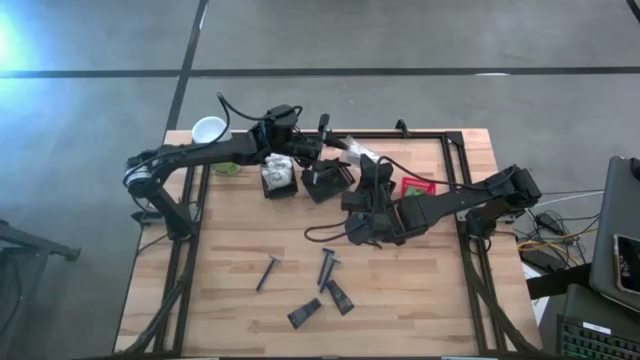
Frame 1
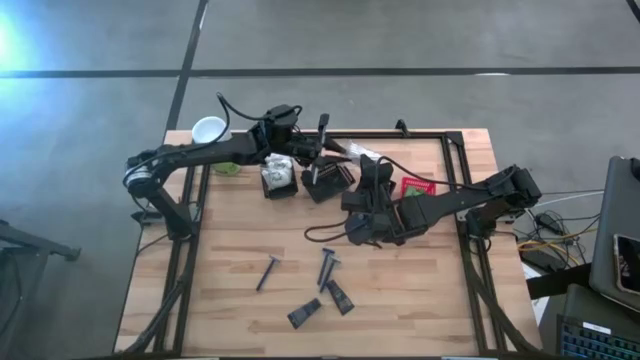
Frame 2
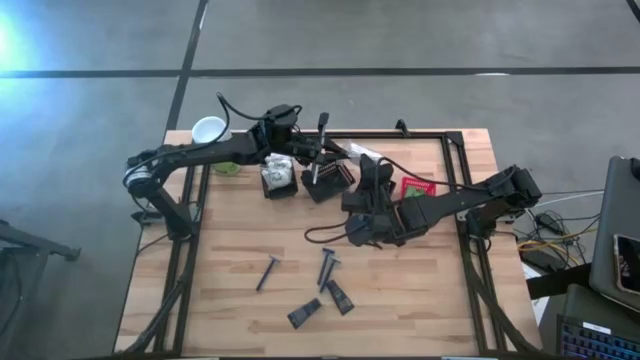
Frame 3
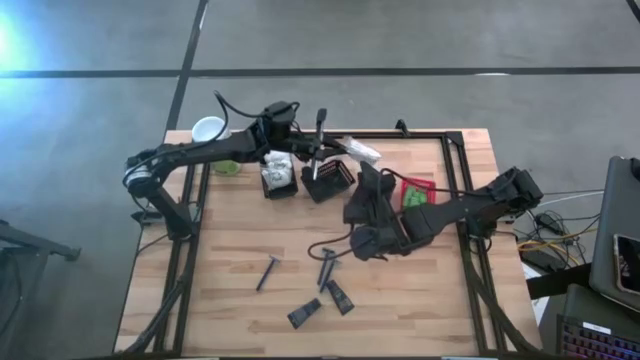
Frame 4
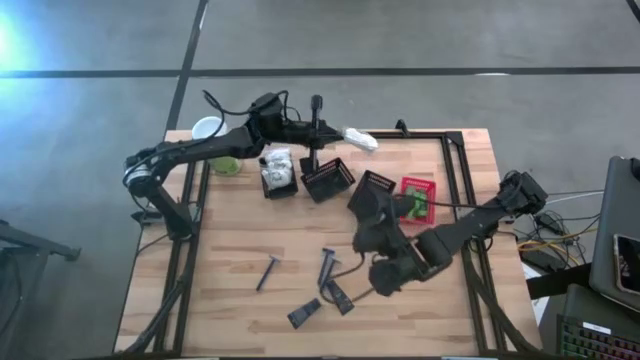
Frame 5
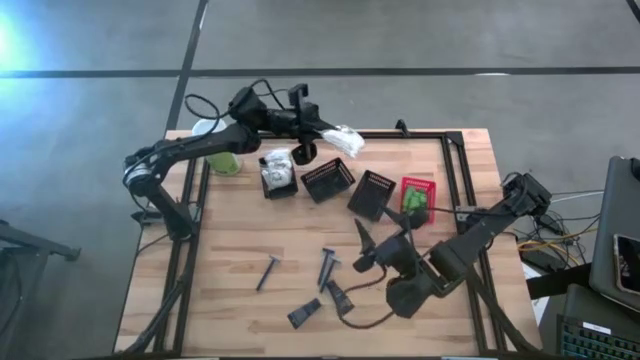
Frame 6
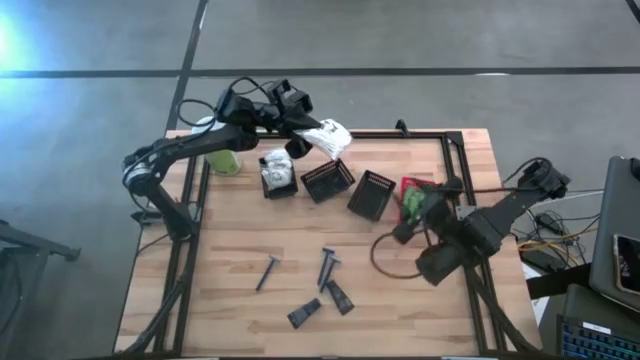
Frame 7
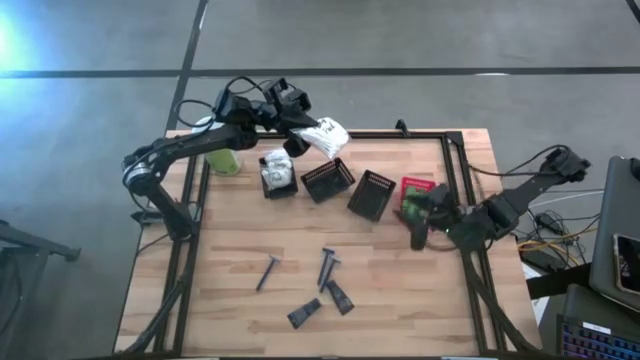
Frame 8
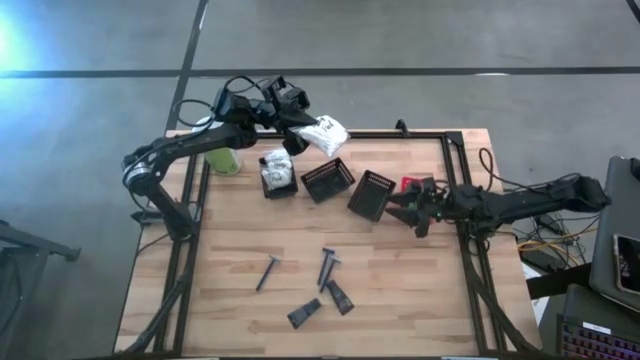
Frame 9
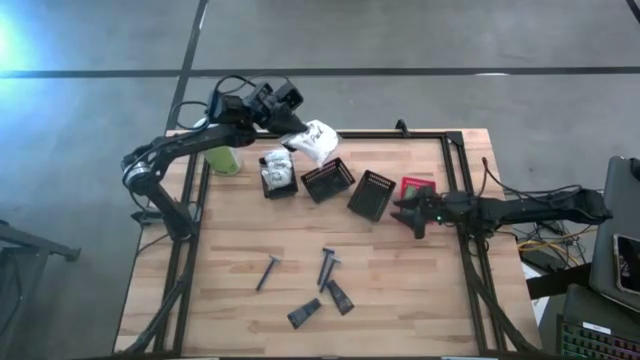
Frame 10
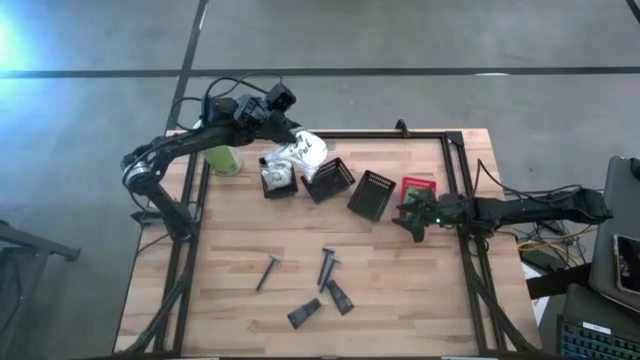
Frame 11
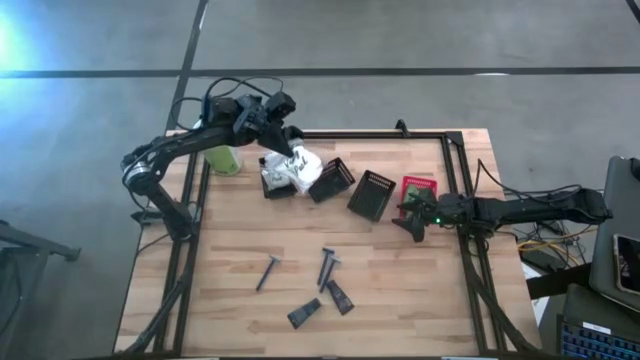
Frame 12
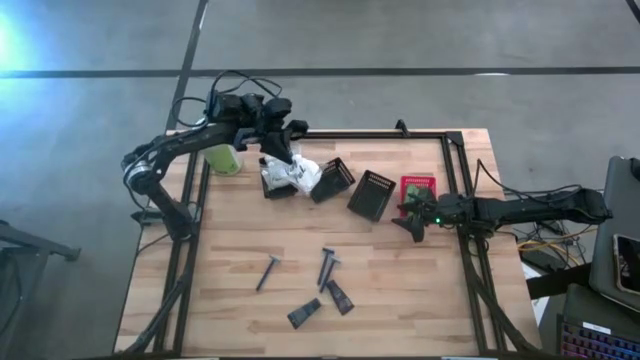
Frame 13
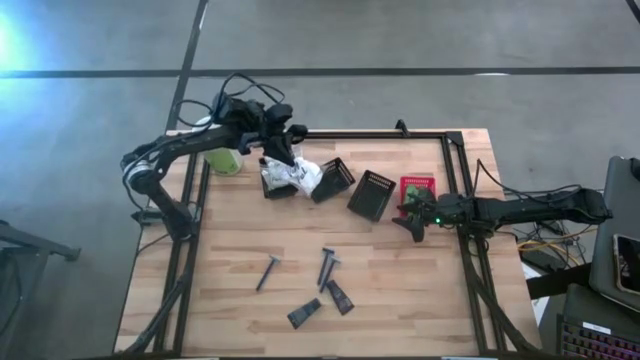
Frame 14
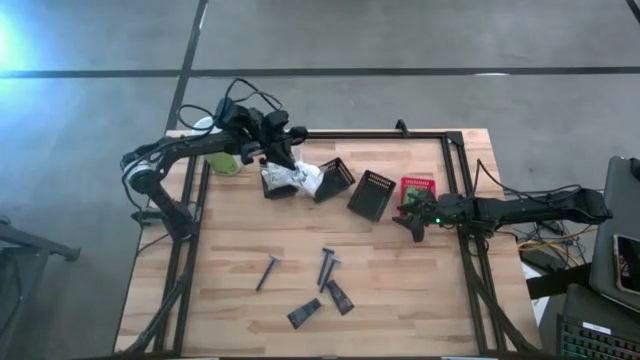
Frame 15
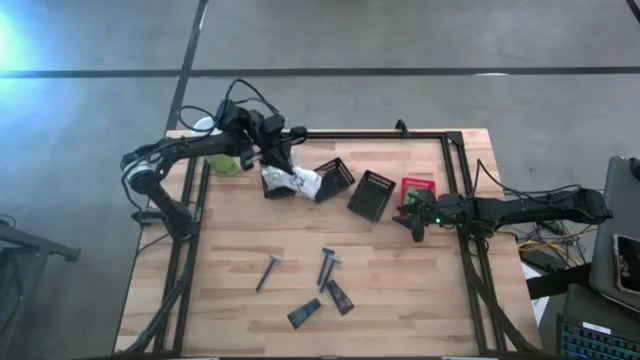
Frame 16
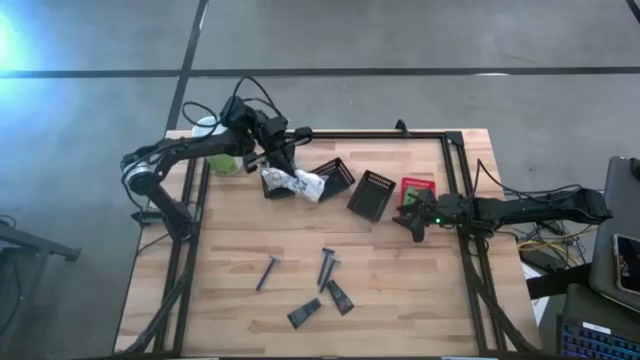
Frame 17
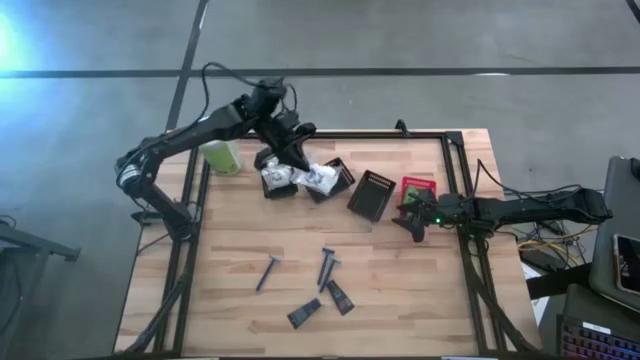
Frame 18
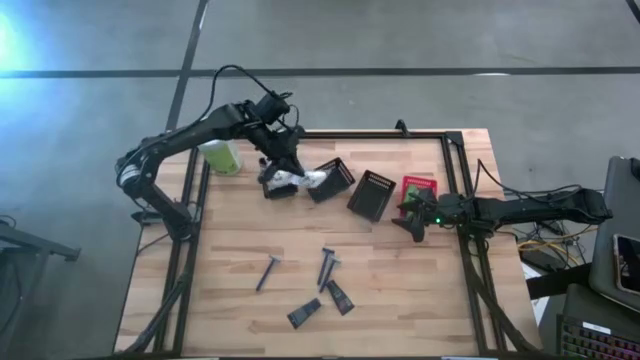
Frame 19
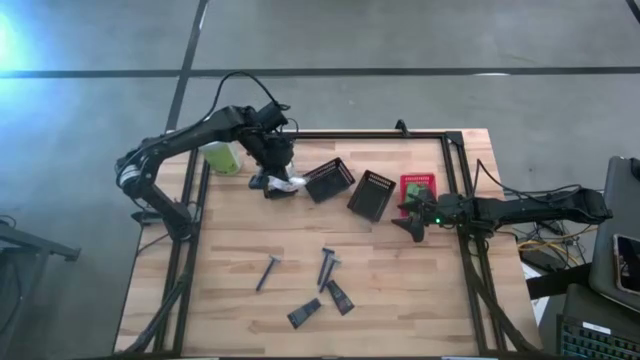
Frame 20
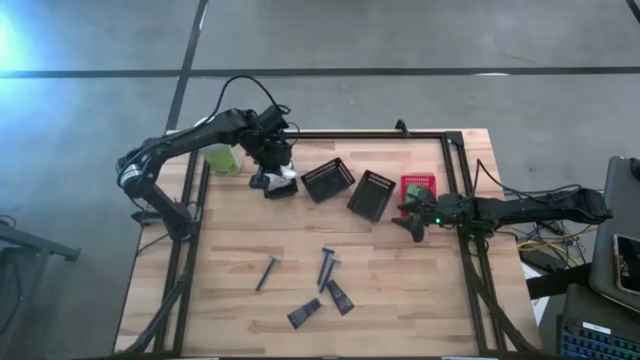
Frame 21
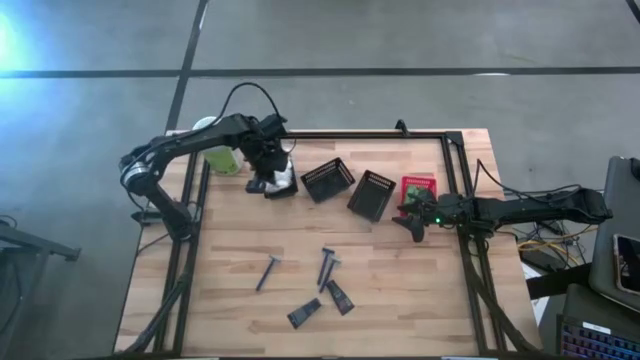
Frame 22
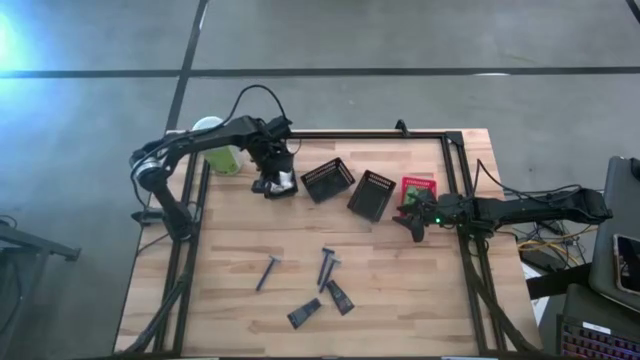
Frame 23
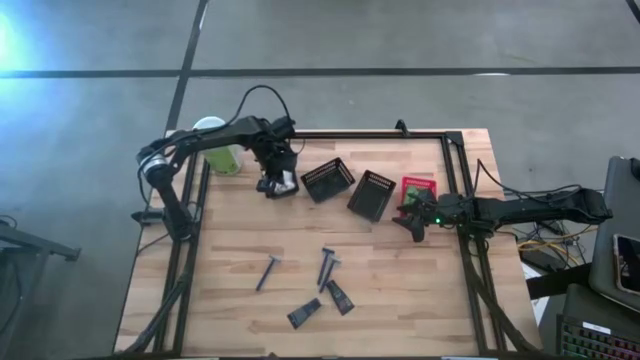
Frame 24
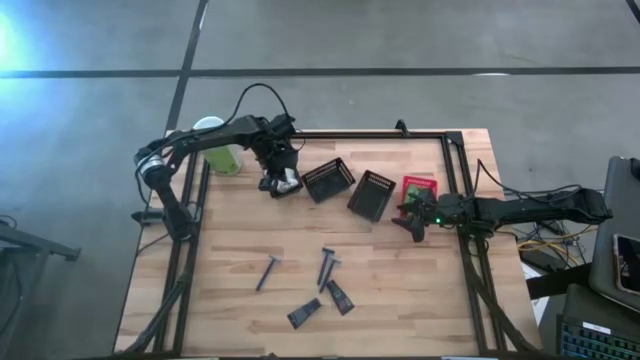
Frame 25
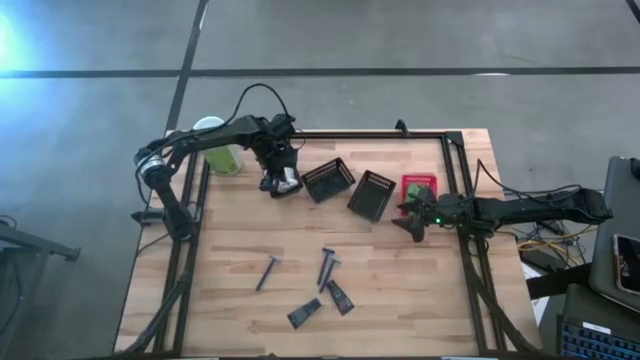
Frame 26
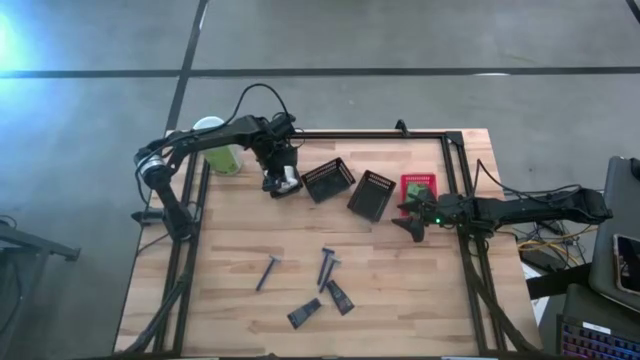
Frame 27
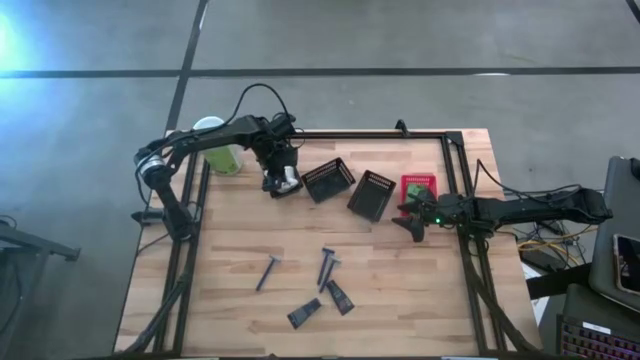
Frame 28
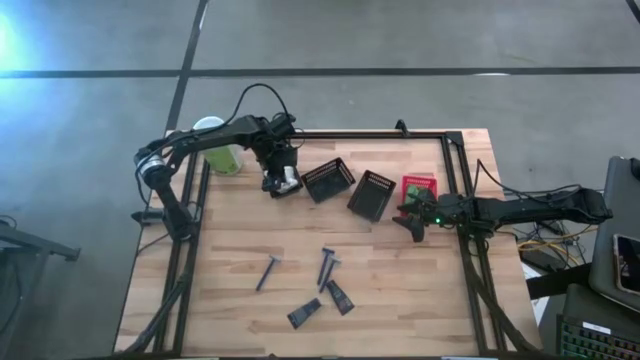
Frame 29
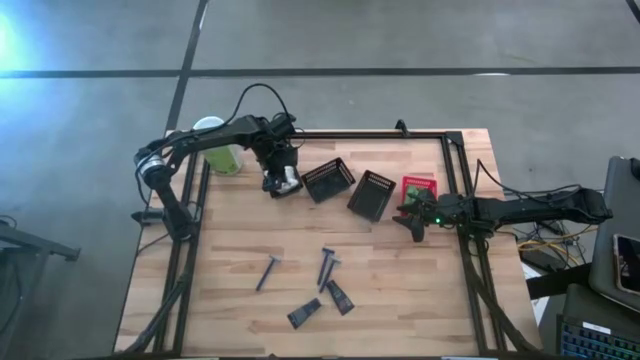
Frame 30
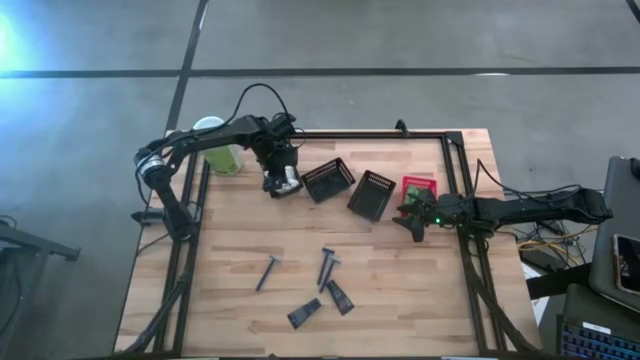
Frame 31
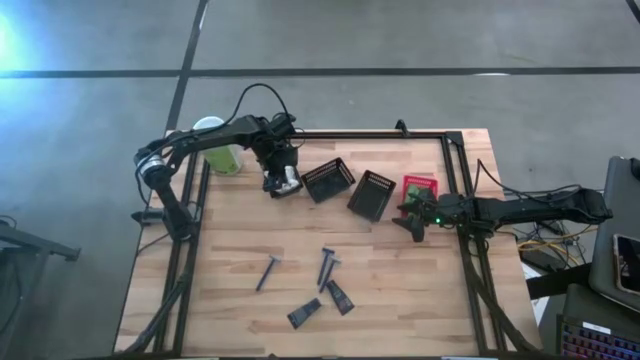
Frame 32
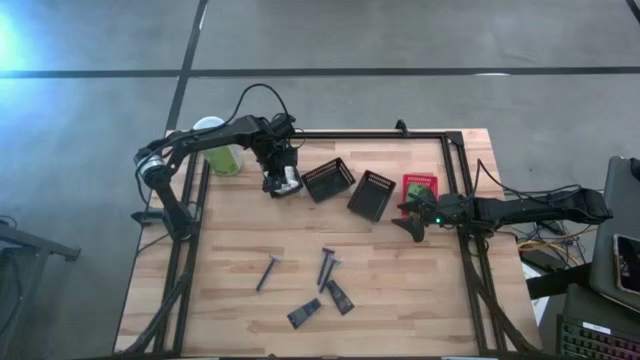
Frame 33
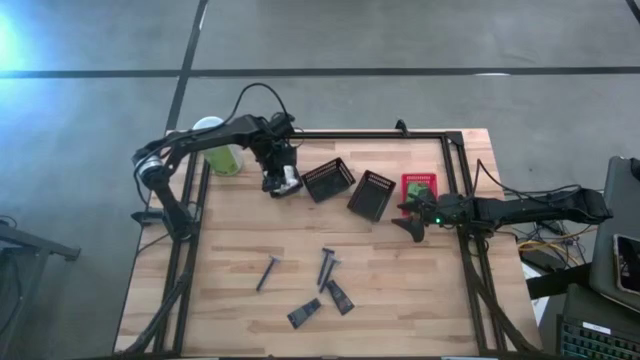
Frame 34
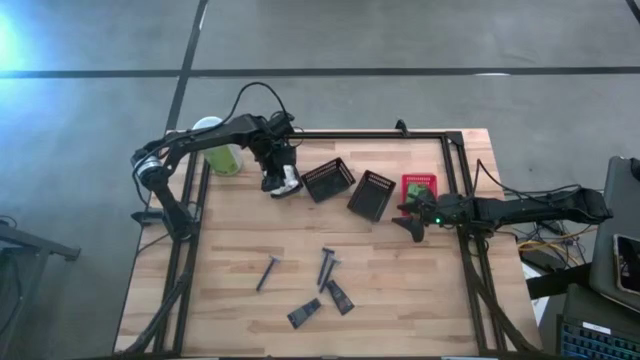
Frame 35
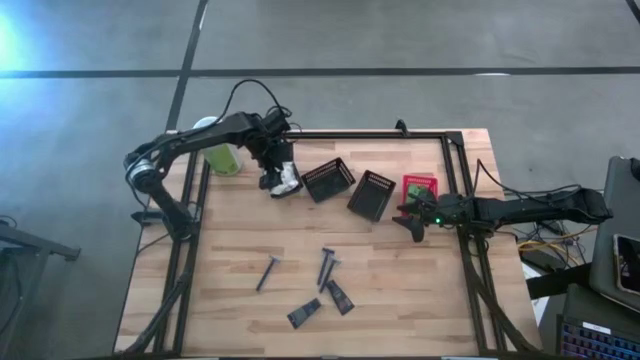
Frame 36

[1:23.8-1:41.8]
Task: Pick & Place Travel size toiletries
Put the cotton pack into the left black bin

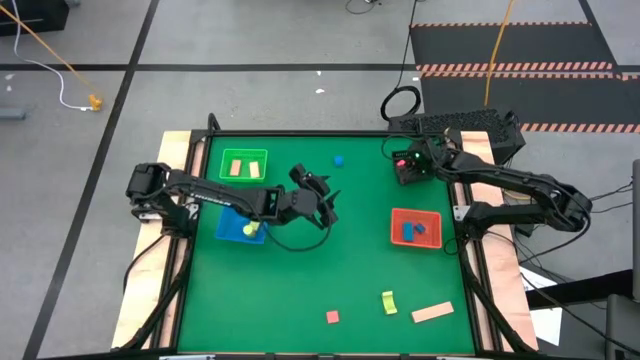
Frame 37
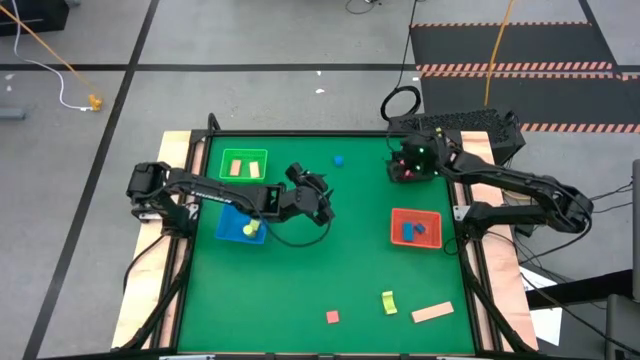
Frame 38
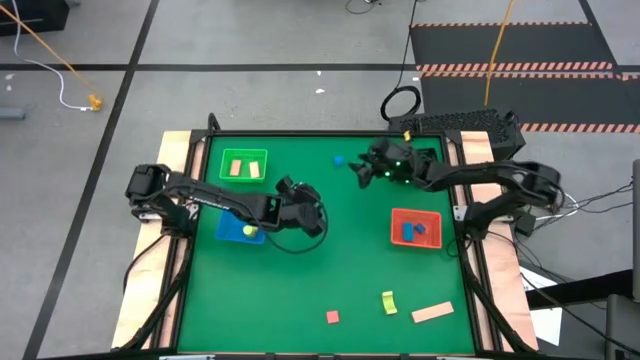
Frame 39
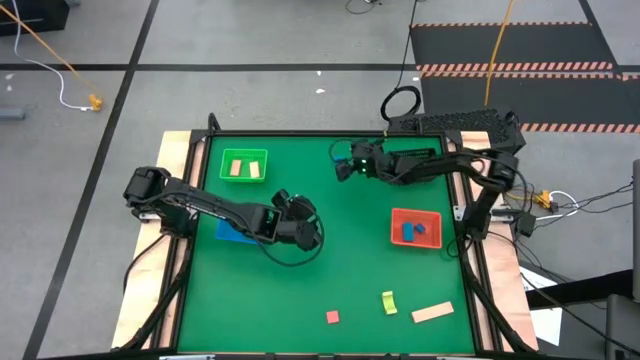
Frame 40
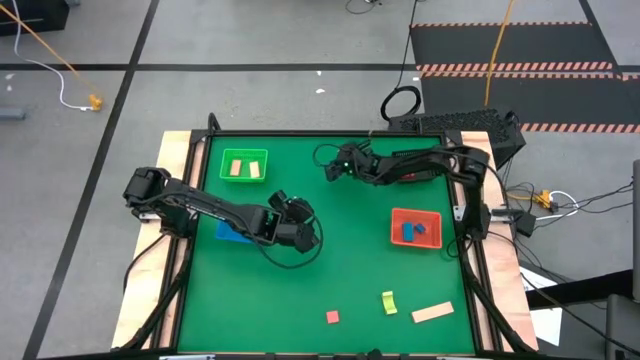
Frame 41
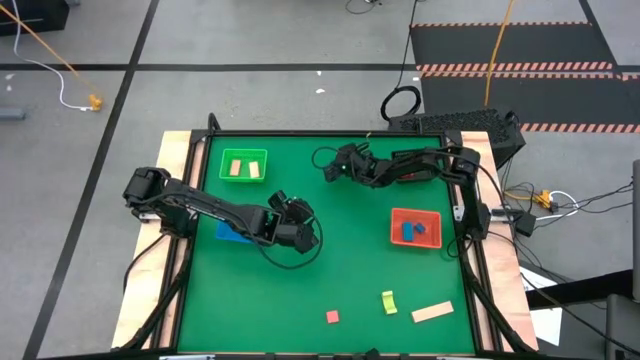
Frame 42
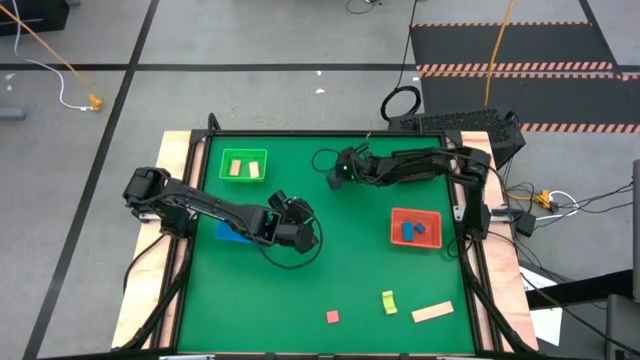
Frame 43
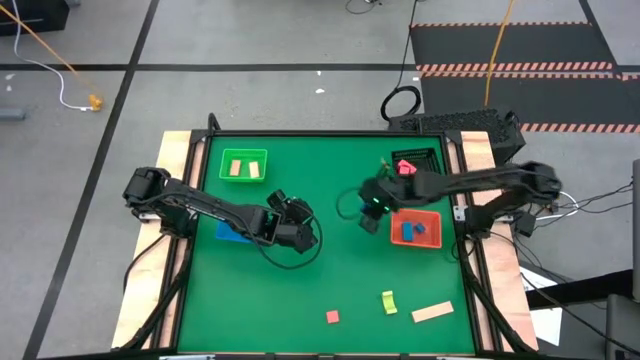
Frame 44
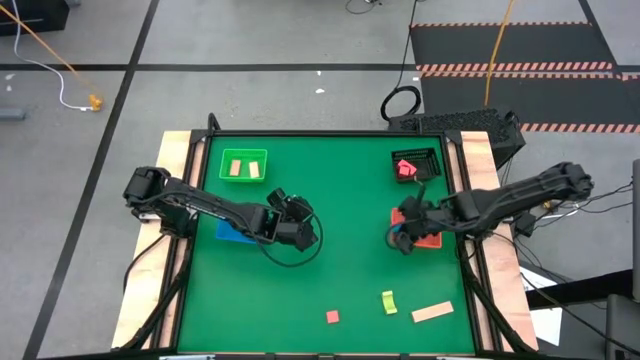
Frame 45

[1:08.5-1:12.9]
Task: Sort & place blocks by color
Put the blue block into the orange bin
